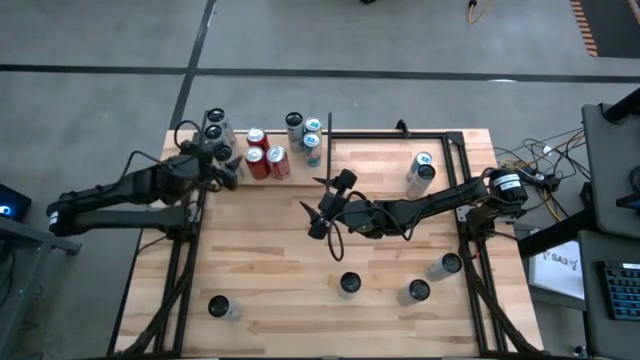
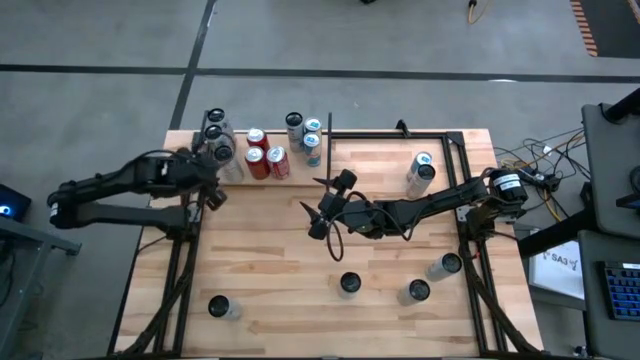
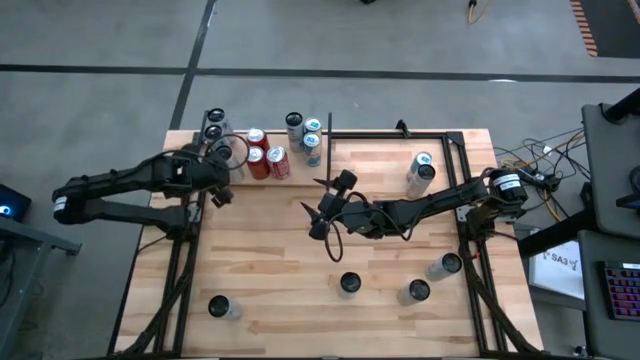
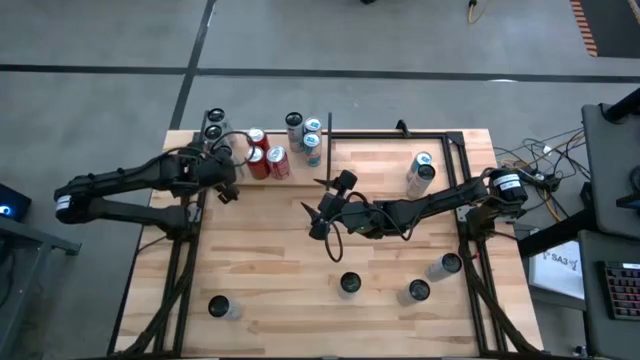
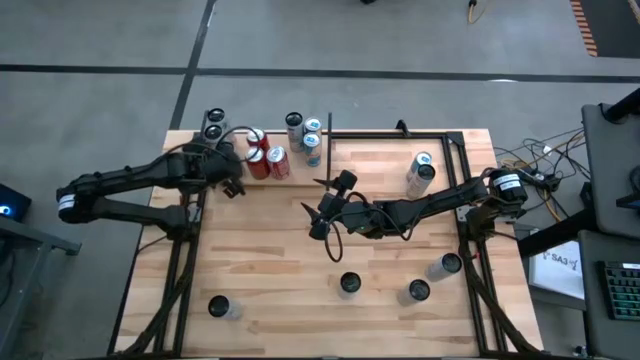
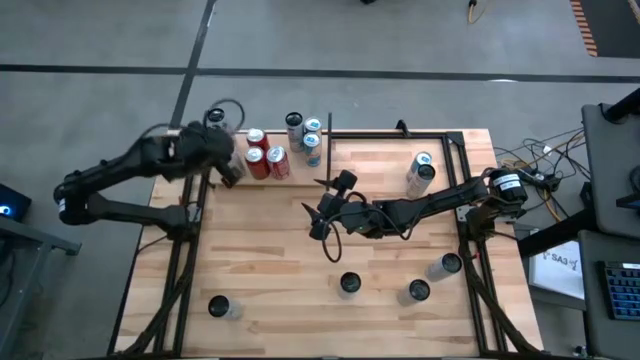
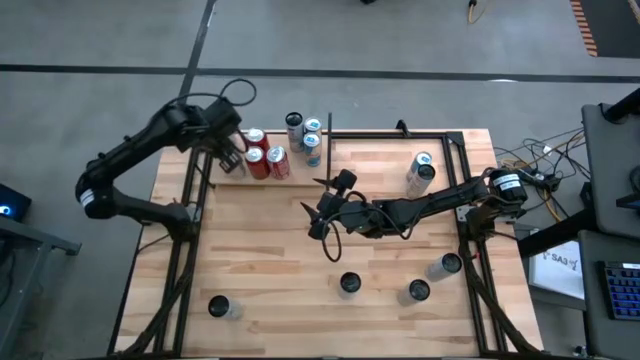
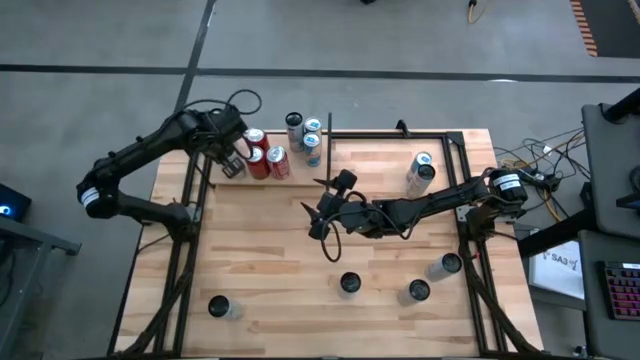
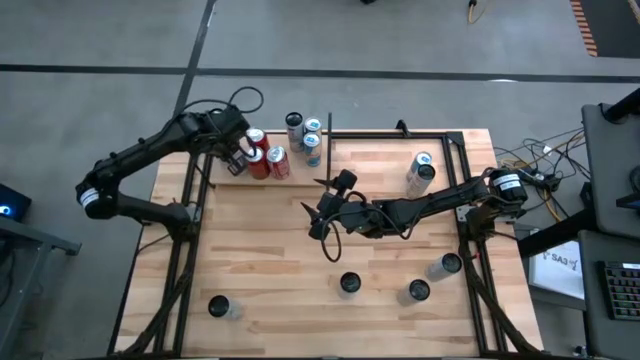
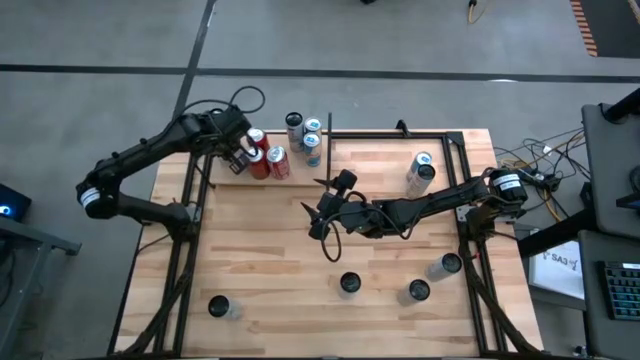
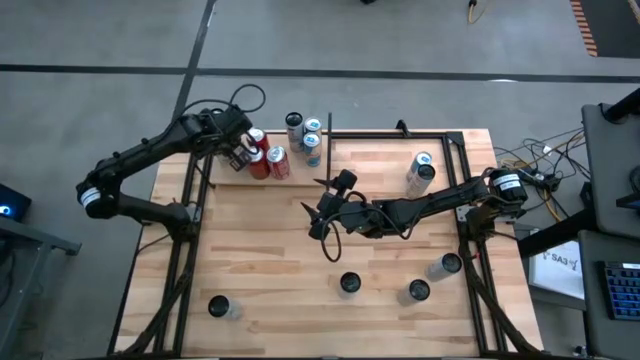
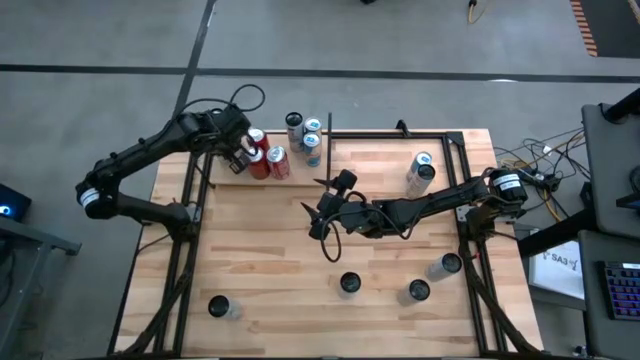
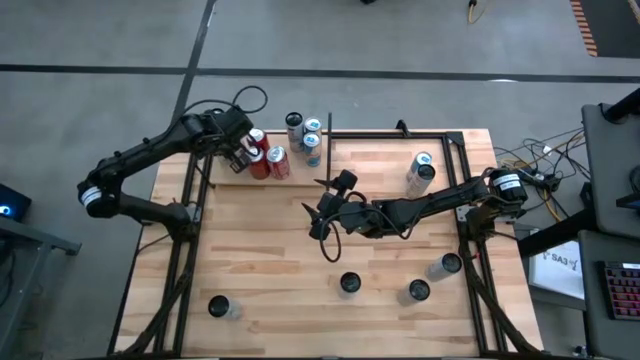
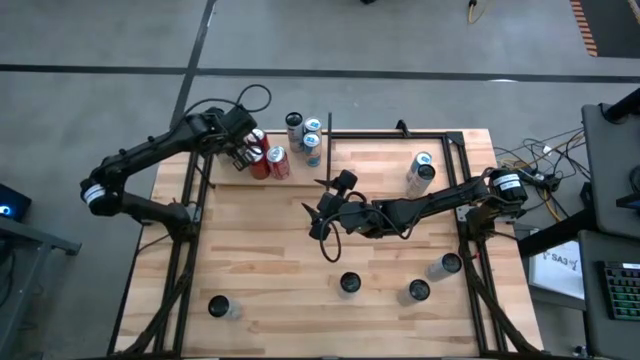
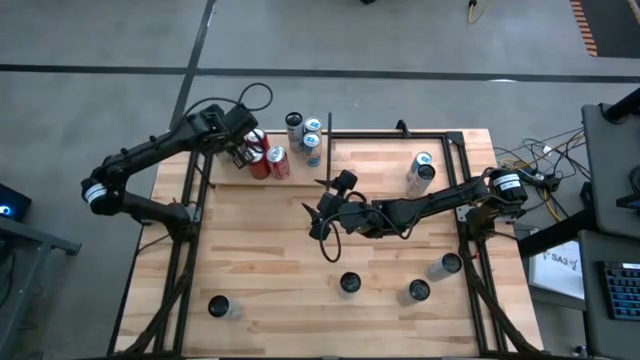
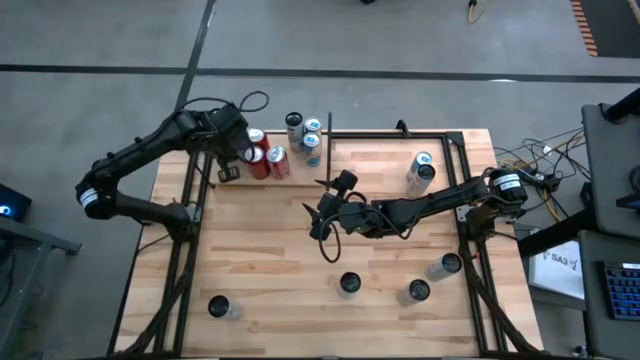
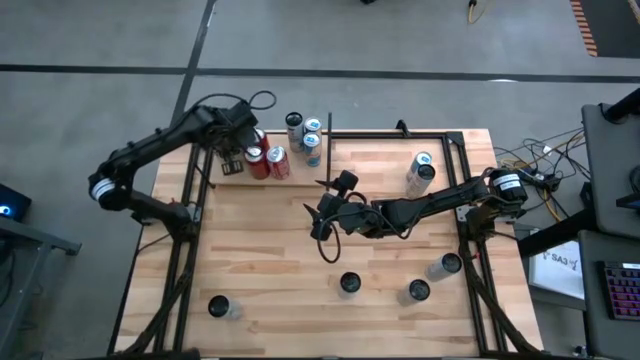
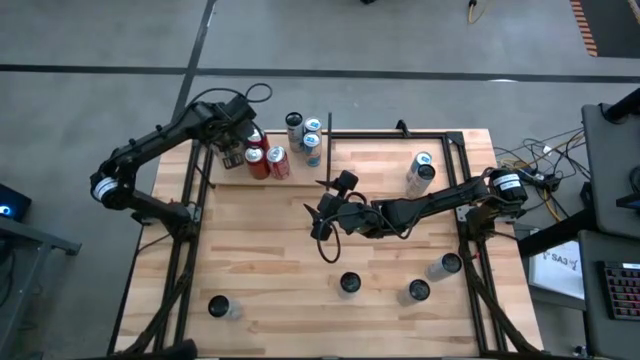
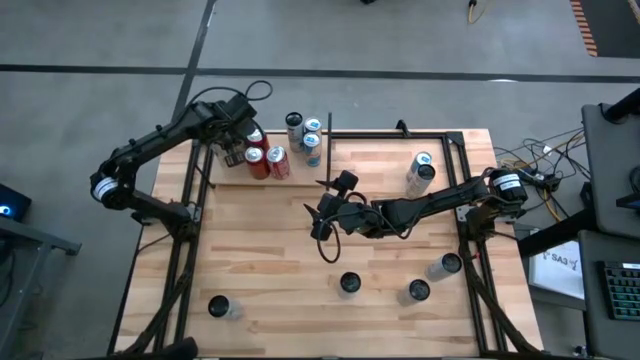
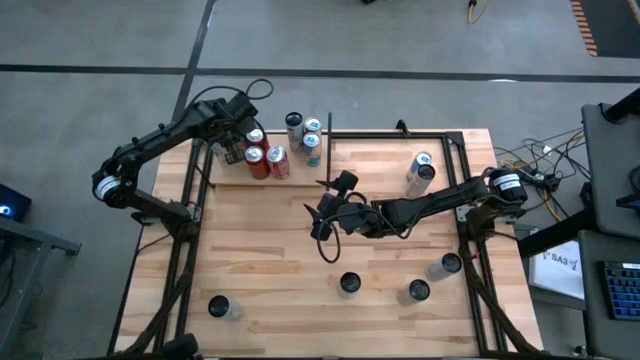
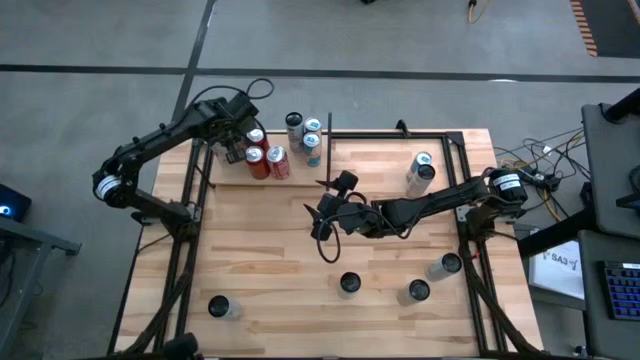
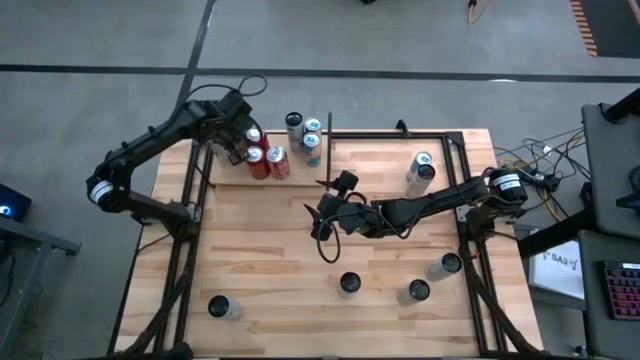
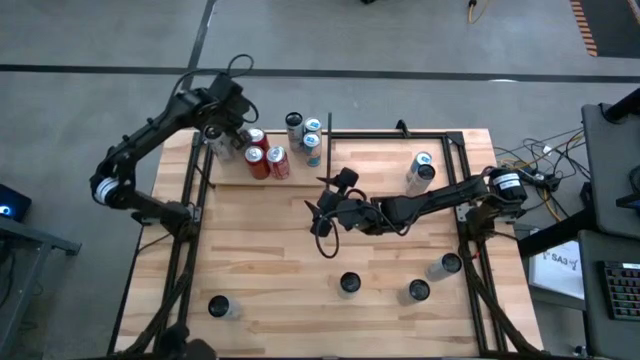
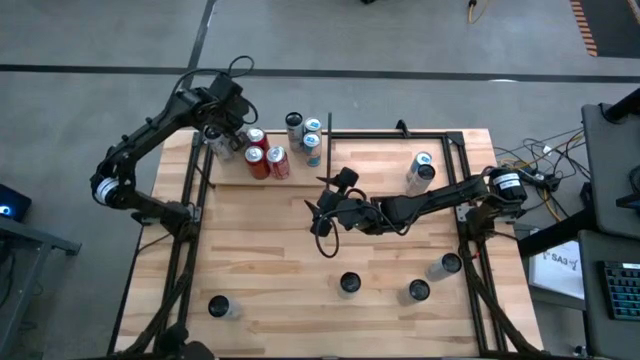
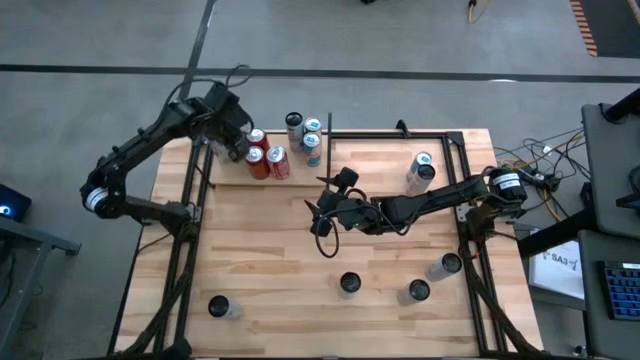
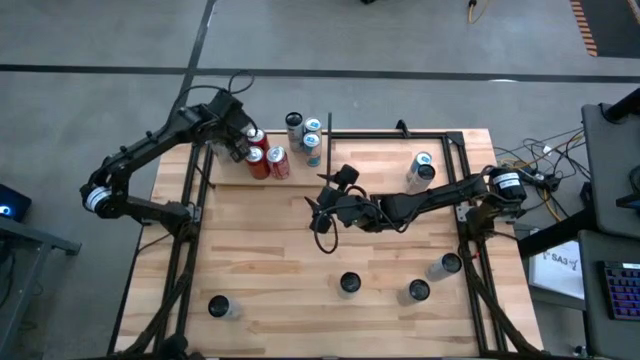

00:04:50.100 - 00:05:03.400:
Task: Place canned beverage on shelf
Put the middle left white and yellow soda can on the shelf

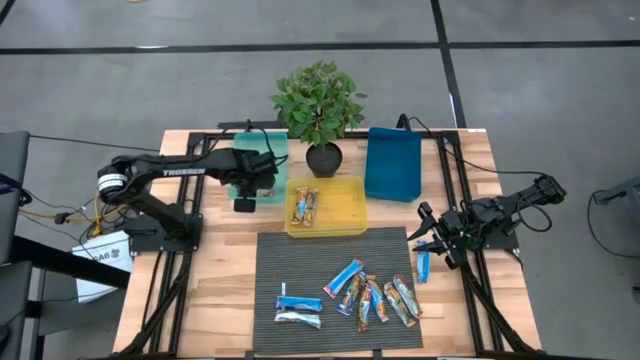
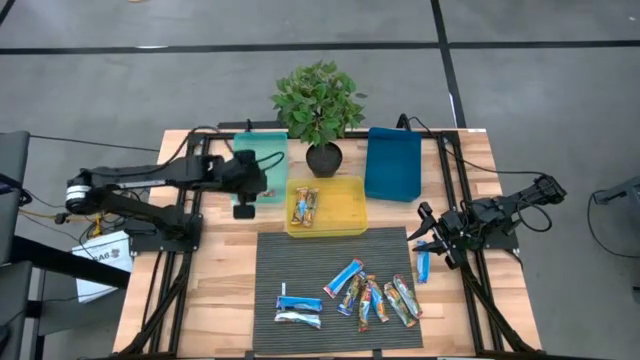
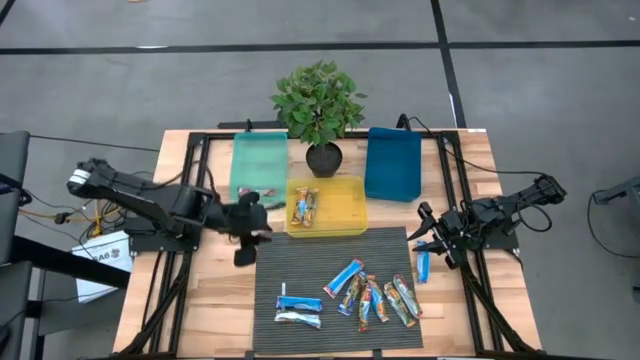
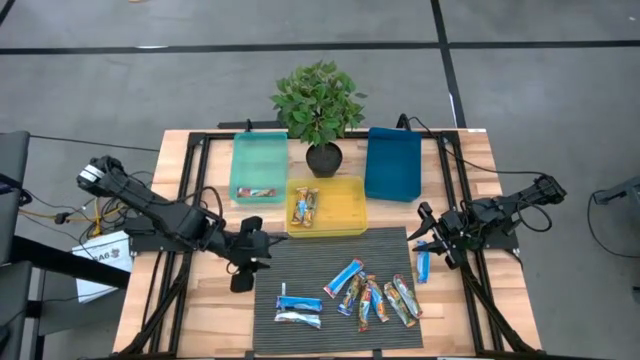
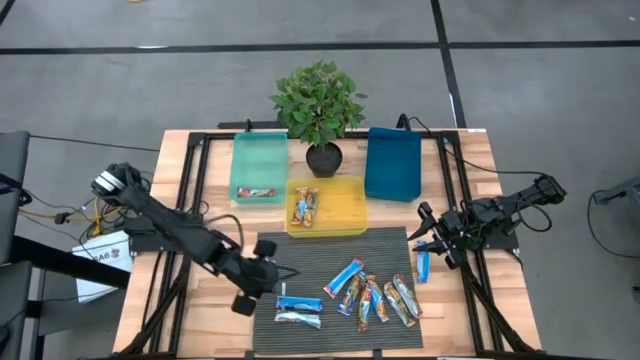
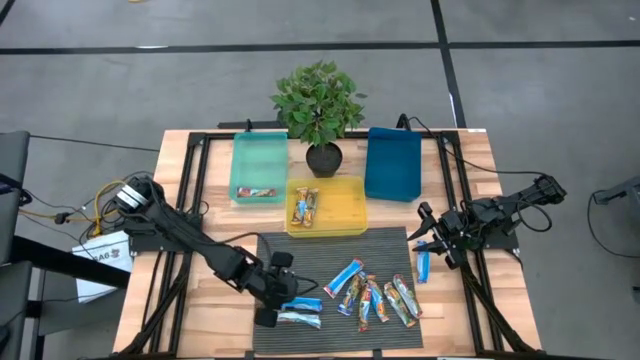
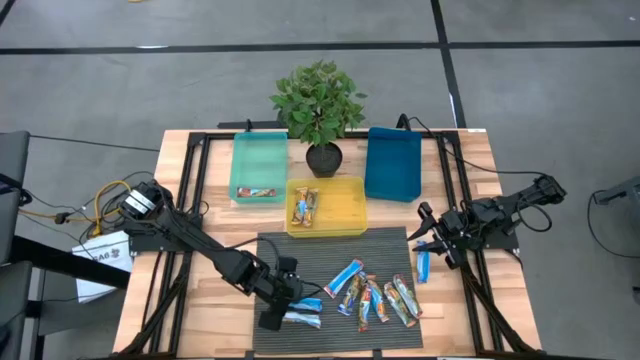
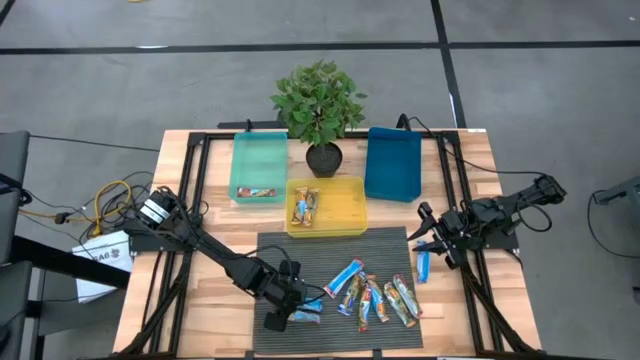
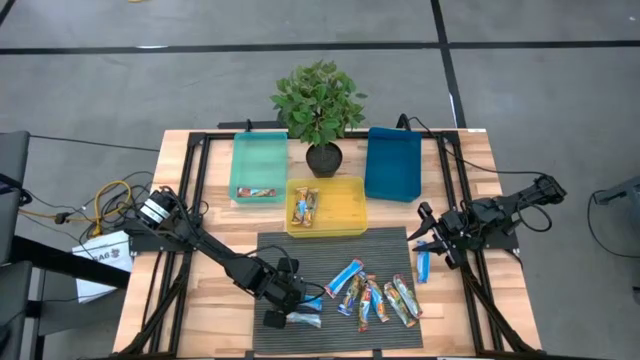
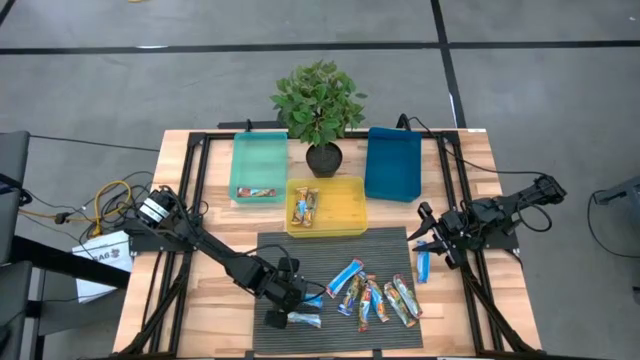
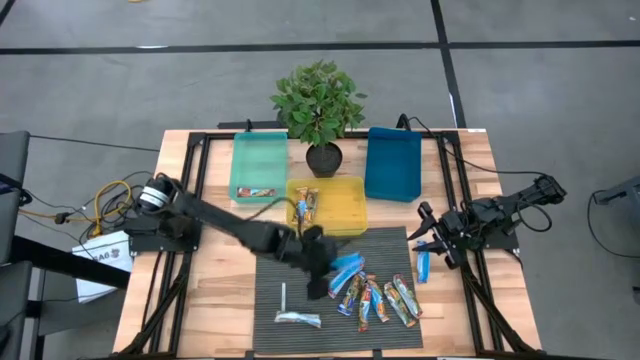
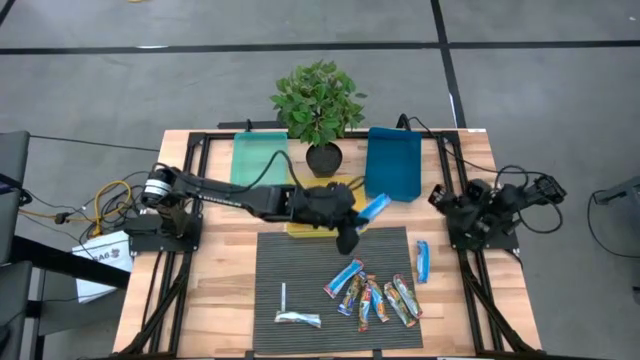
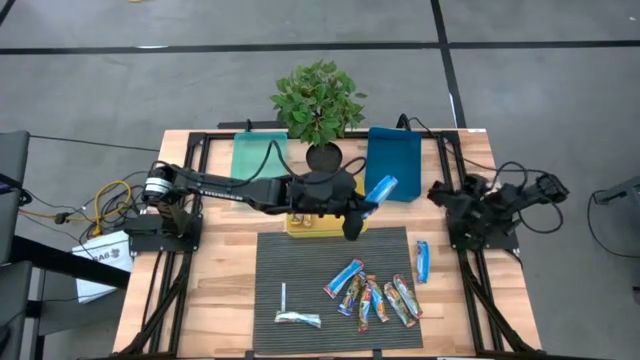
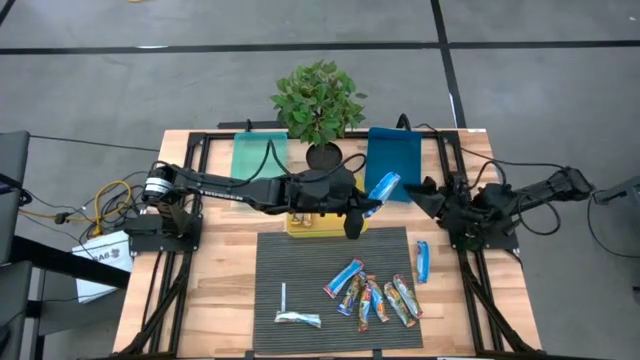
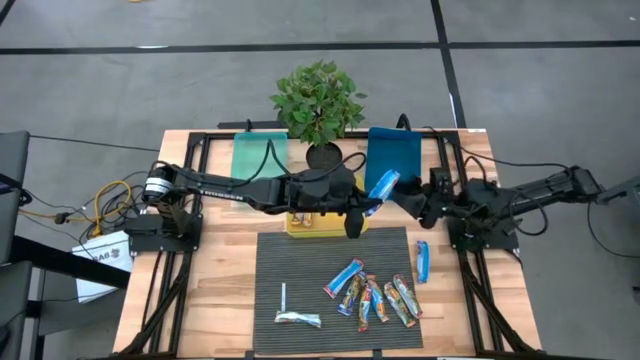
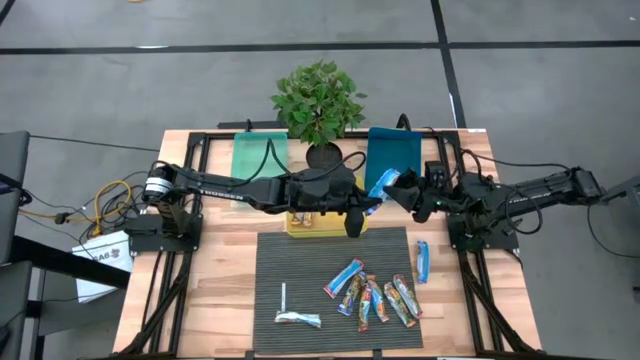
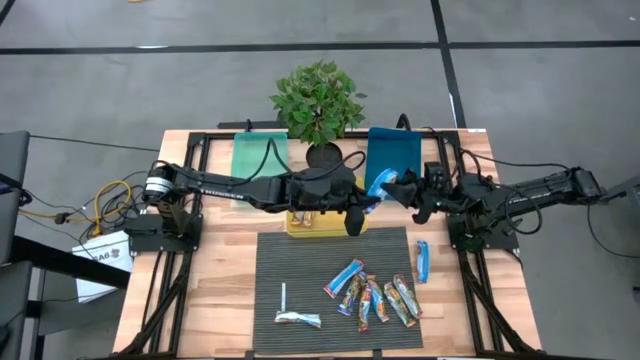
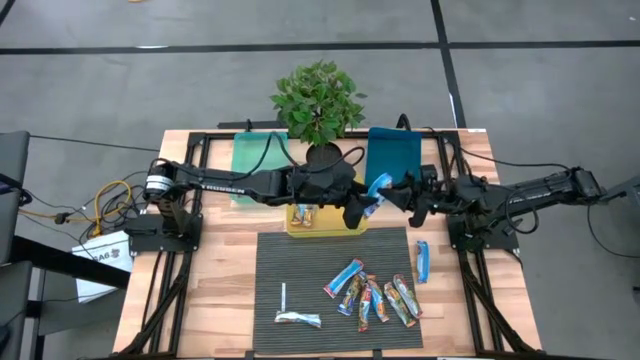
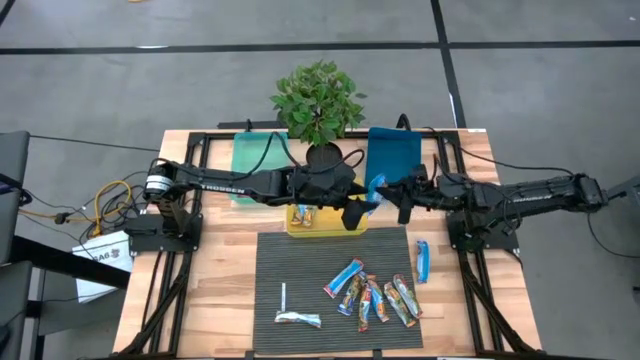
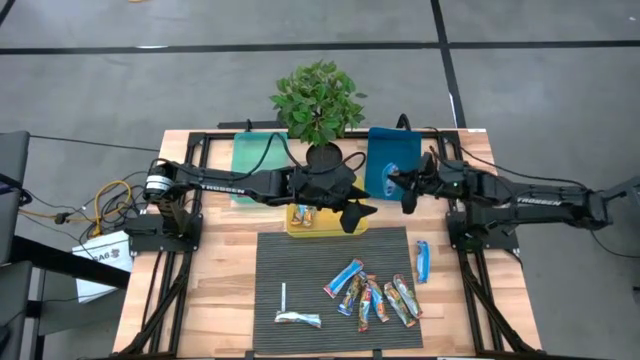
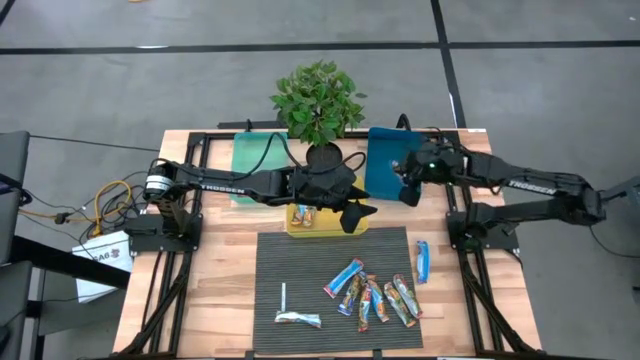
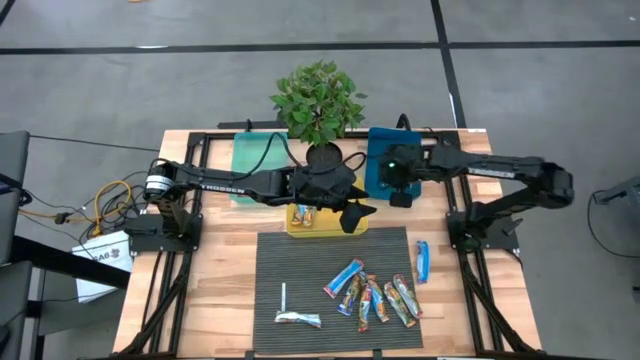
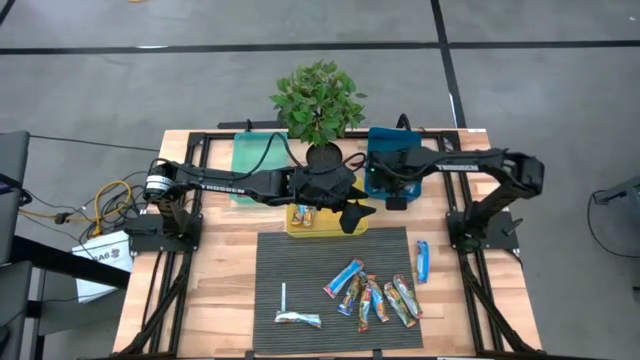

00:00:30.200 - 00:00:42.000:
Task: Pick and place Granola Bars by type
Put the blue granola bar into the blue bin
